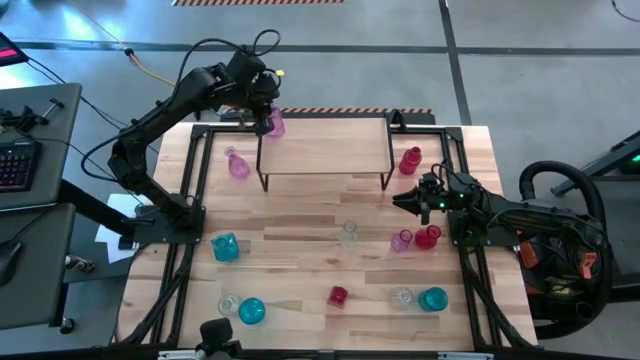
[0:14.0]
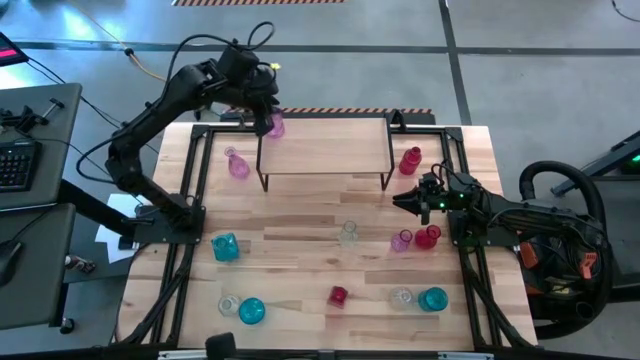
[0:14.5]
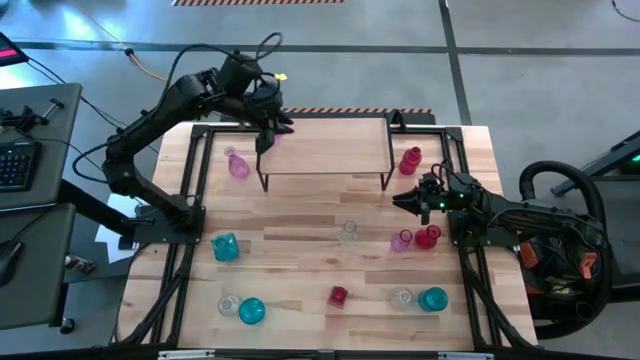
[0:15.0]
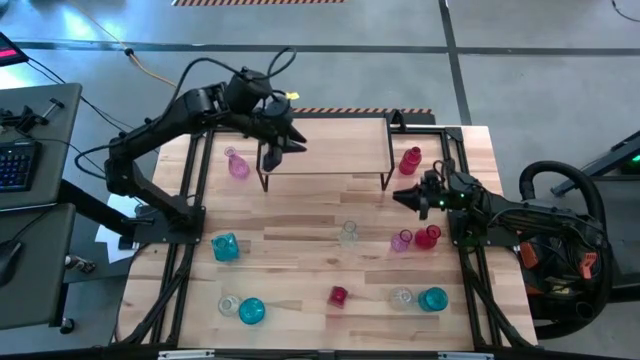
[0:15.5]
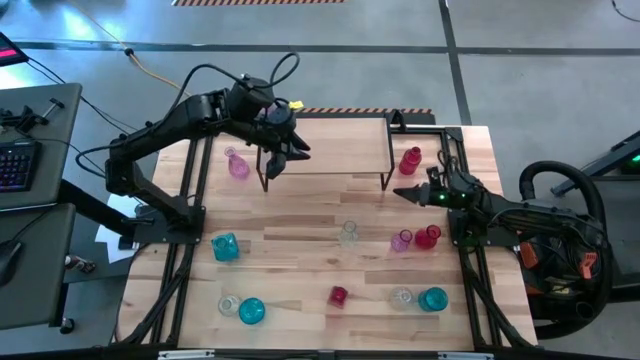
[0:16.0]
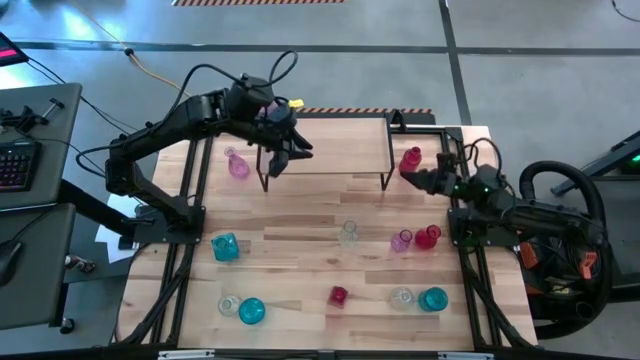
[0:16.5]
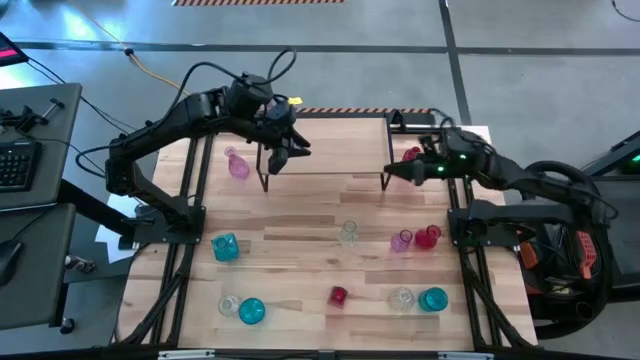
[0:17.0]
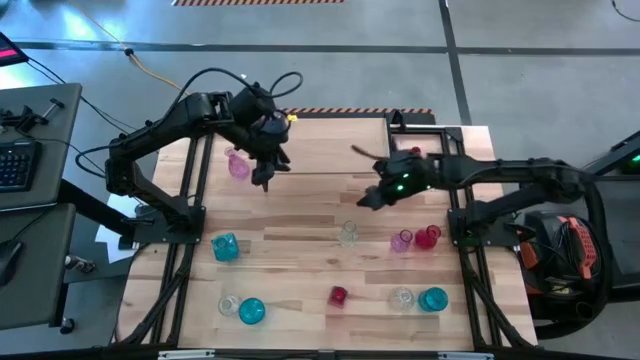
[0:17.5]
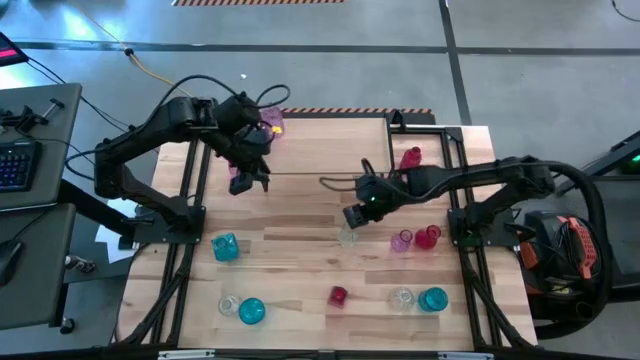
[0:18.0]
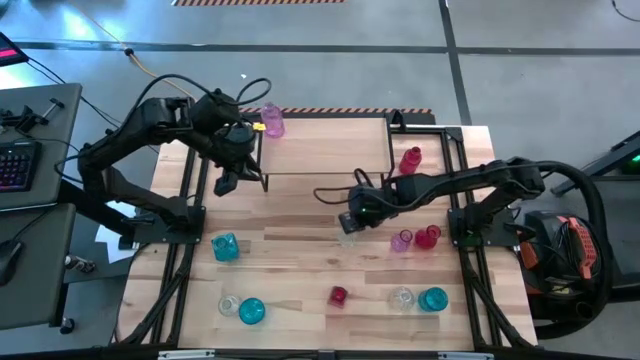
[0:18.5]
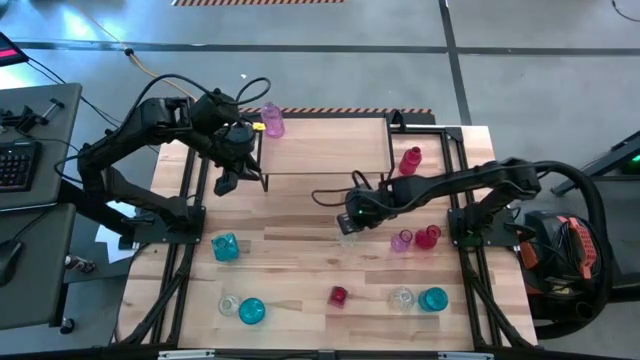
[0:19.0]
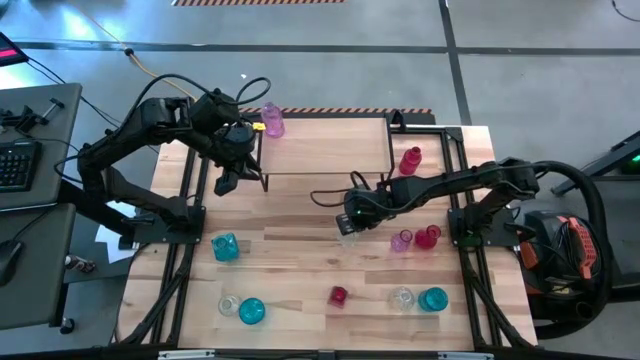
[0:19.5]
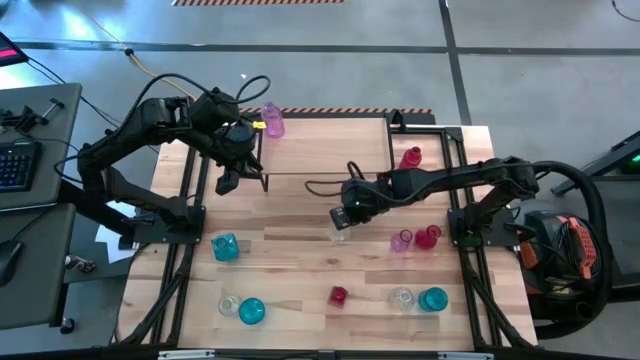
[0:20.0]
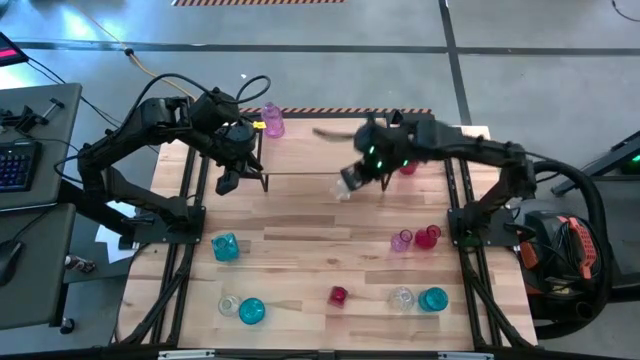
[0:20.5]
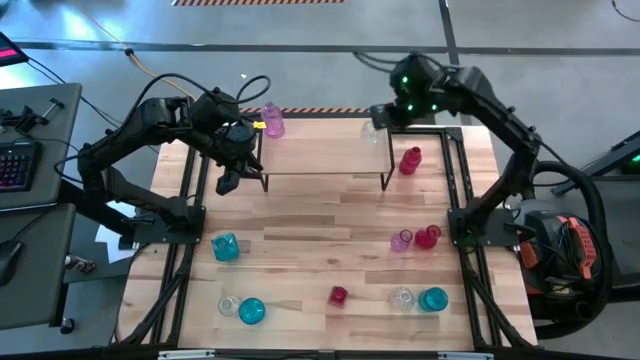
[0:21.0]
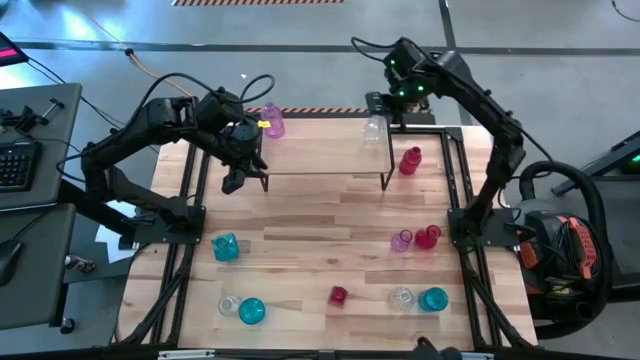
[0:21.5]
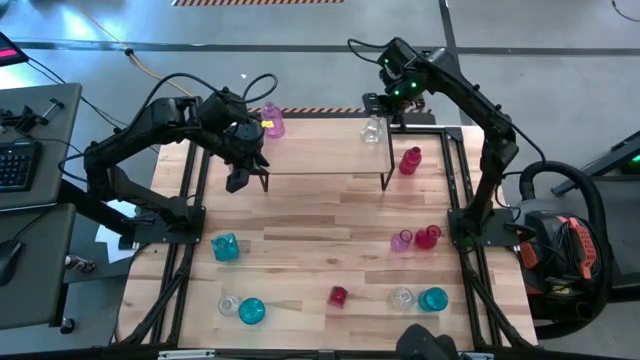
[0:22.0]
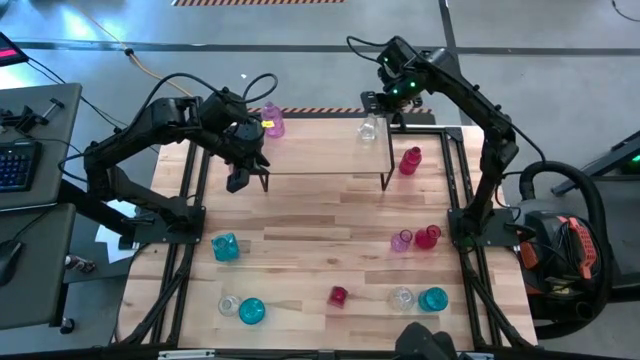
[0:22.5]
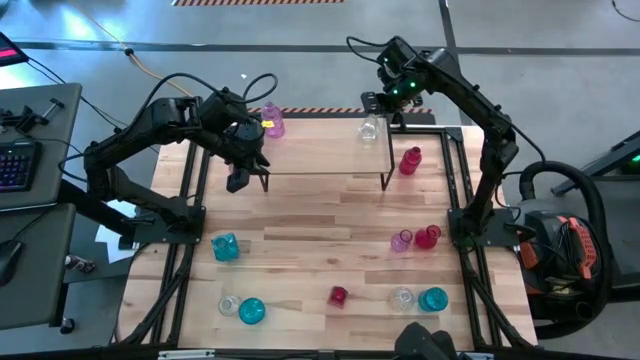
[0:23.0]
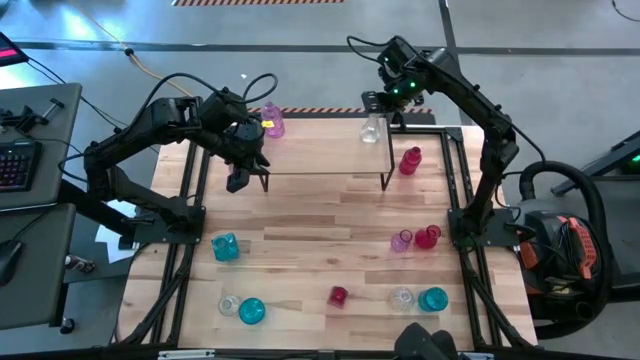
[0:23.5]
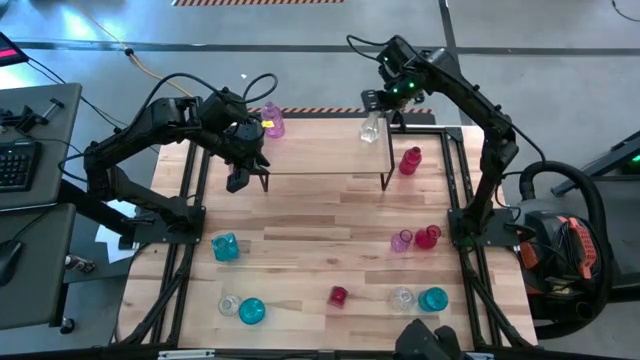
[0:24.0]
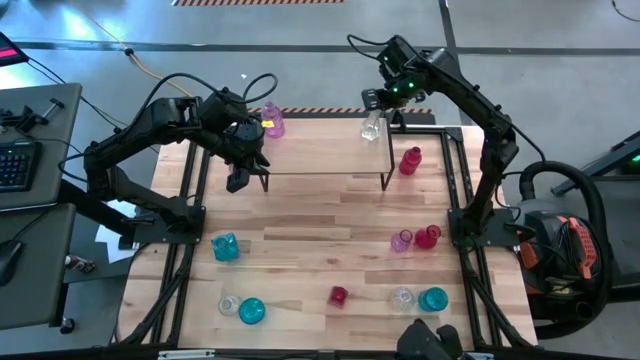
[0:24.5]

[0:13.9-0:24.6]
Task: sort vases onto shelf
Put the top transparent vase on the shelf

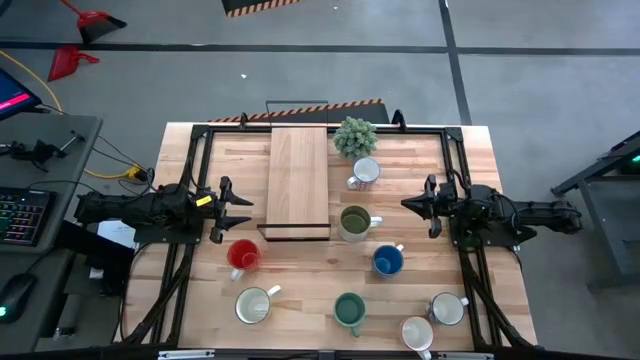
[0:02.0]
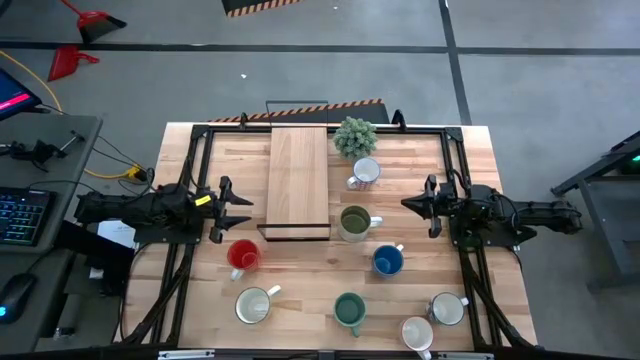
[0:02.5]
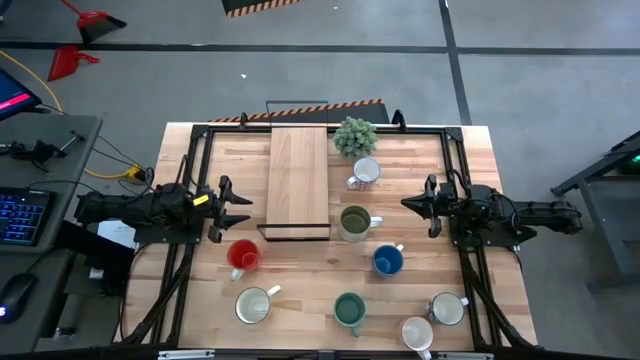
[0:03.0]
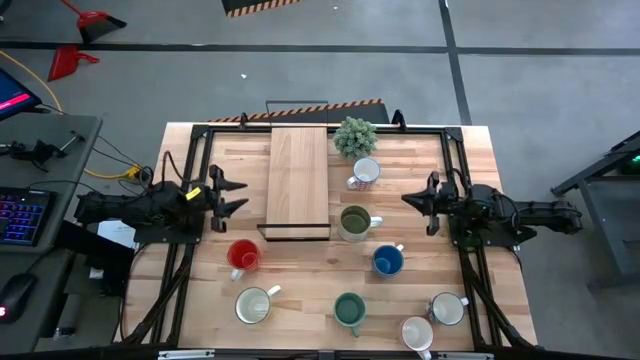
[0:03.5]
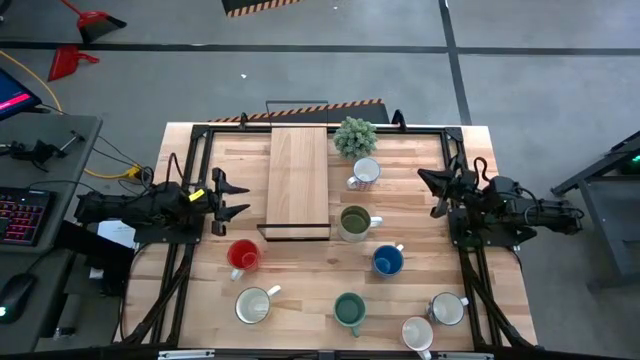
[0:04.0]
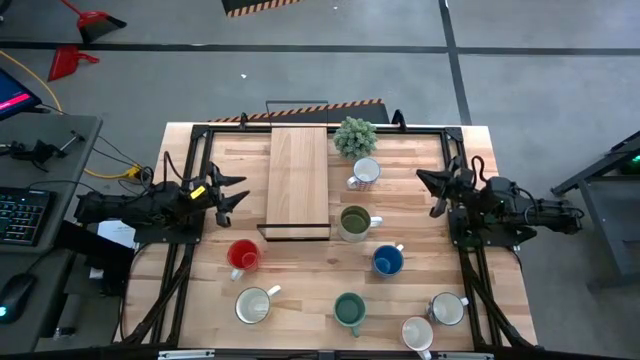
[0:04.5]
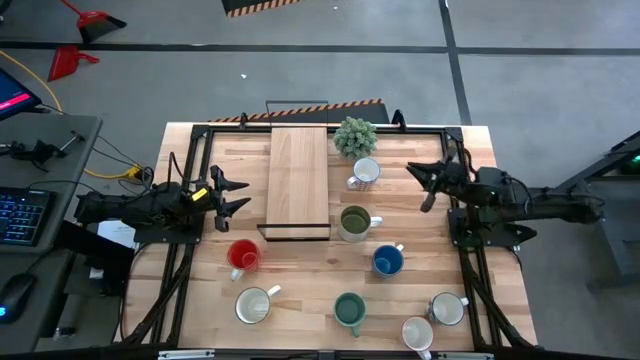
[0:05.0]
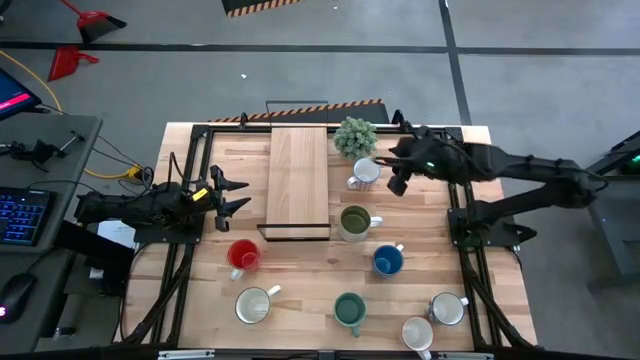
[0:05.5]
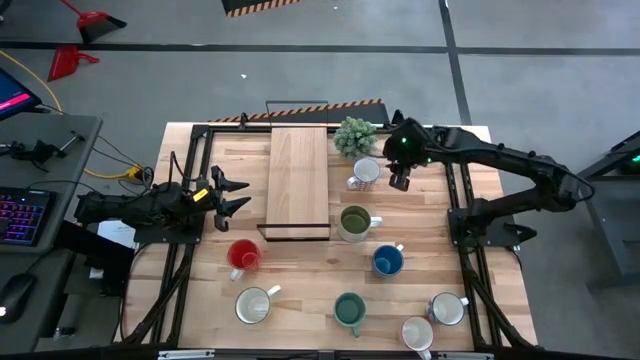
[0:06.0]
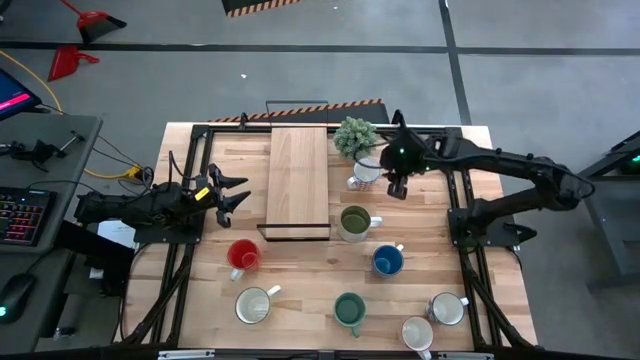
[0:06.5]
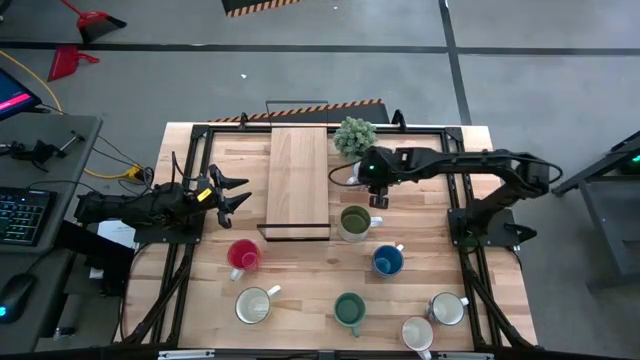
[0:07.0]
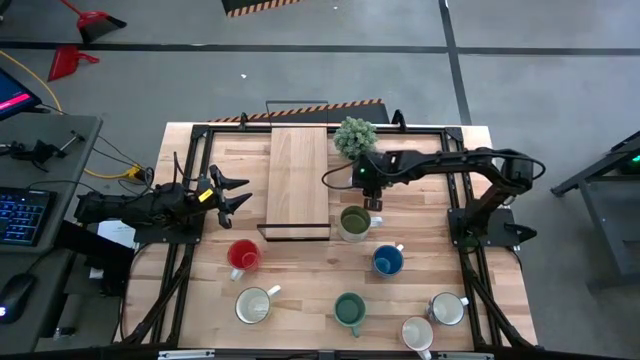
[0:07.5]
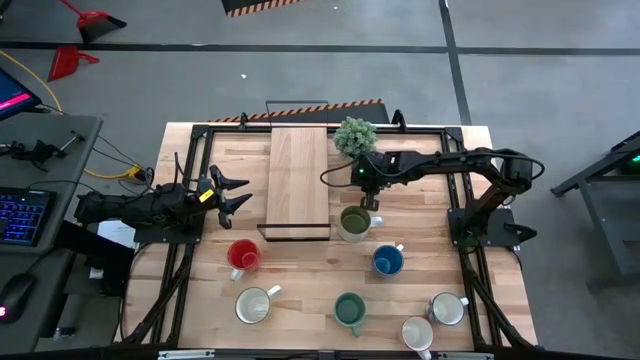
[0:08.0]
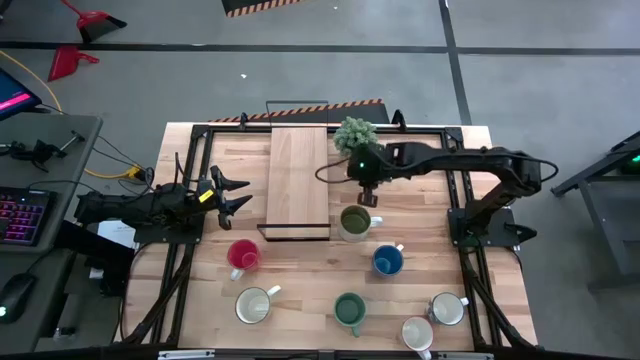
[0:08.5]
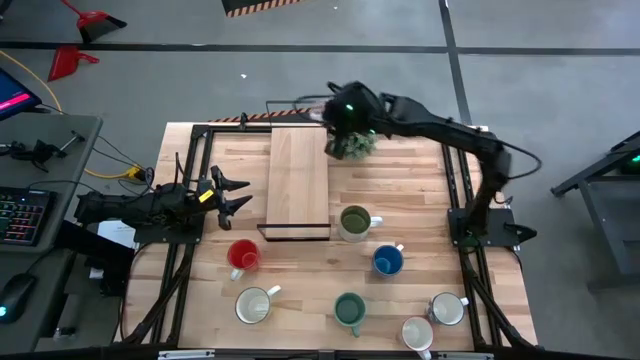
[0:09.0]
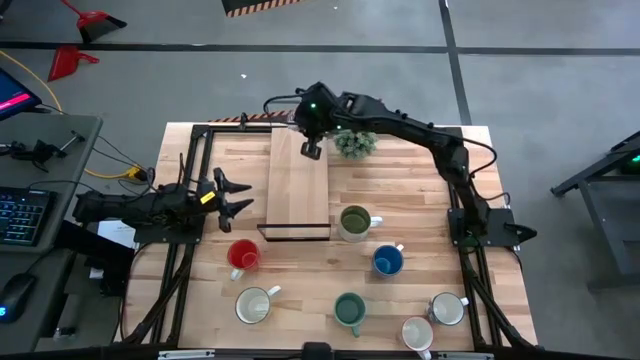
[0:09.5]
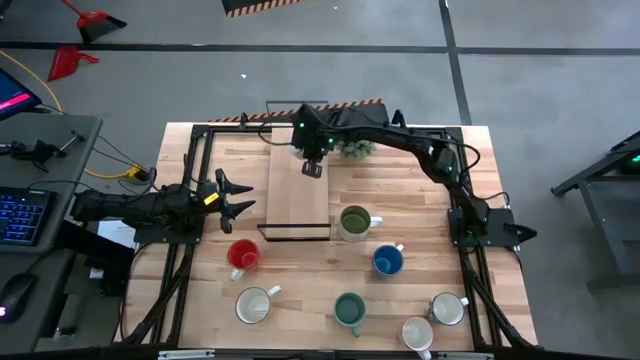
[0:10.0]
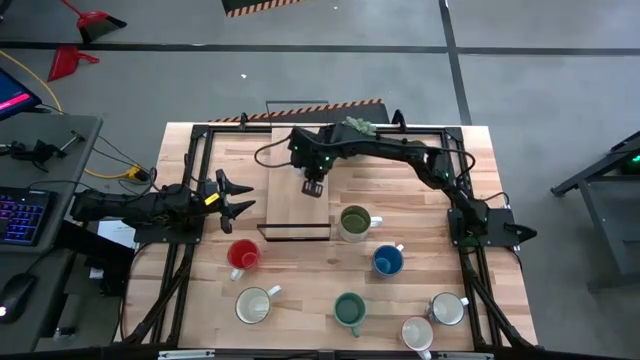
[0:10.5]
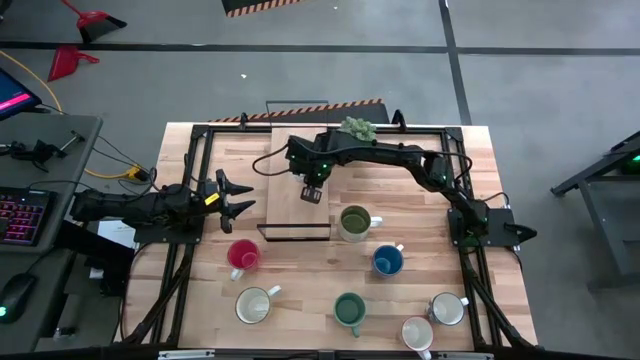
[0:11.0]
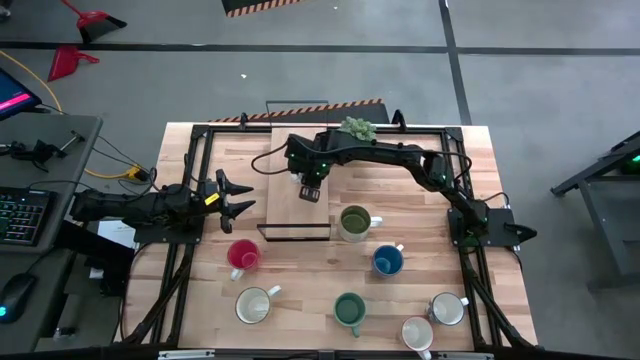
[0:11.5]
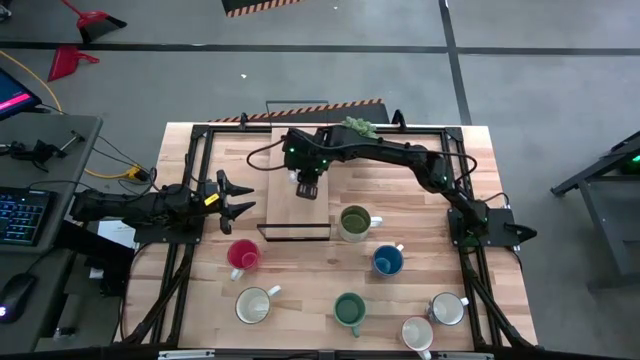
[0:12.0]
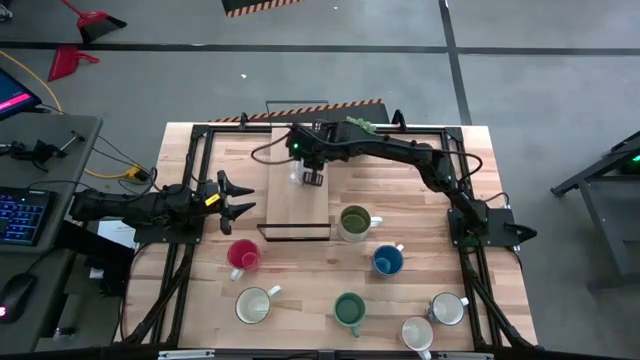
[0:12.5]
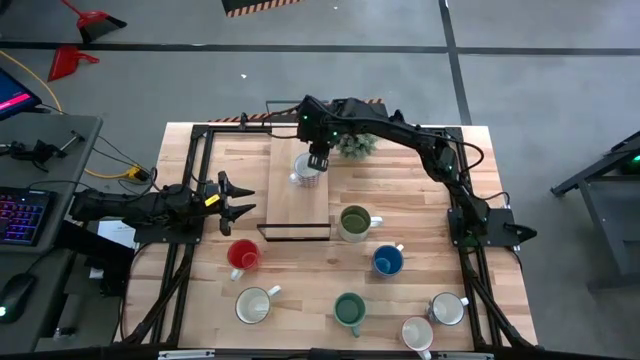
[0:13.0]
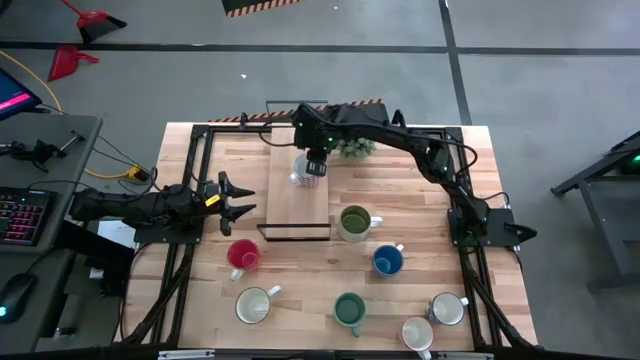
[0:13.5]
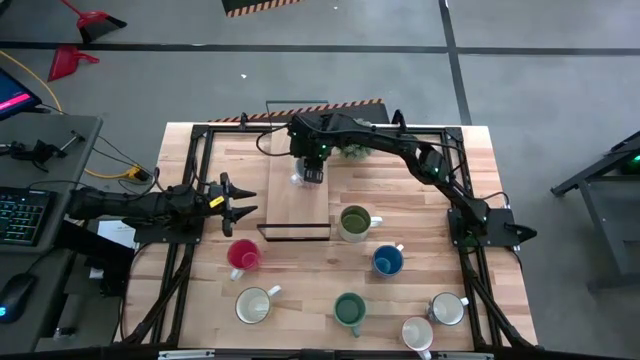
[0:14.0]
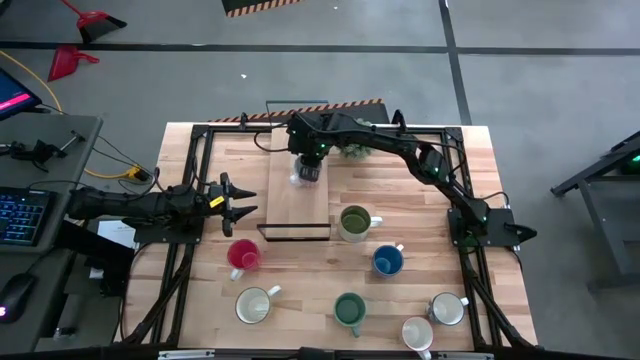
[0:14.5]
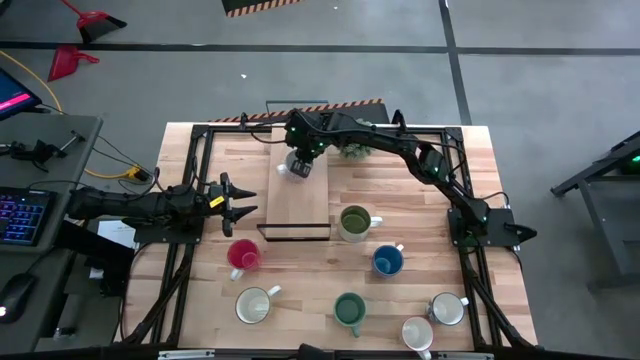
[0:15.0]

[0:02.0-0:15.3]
Task: Place coffee mugs
Put the red patterned mug on the shelf
